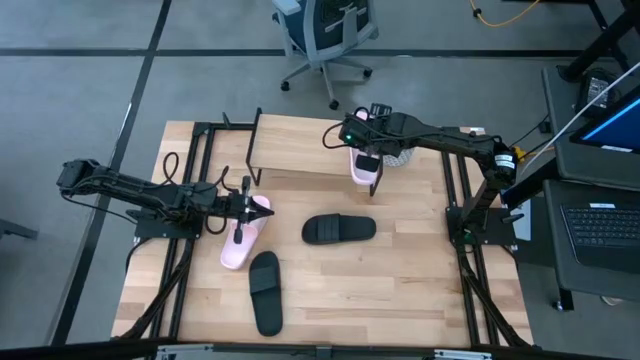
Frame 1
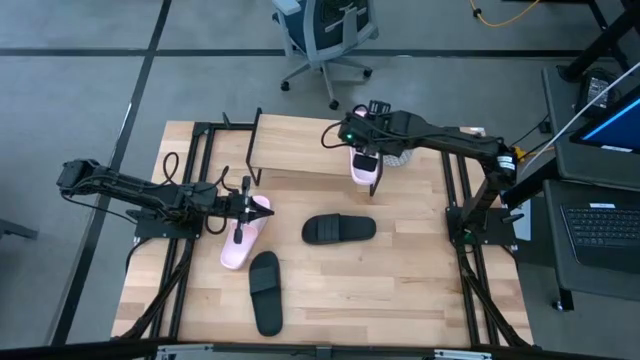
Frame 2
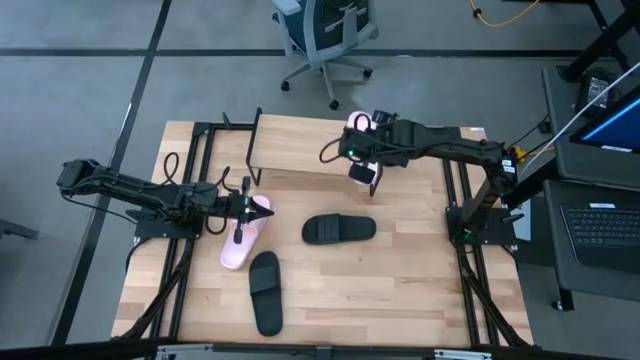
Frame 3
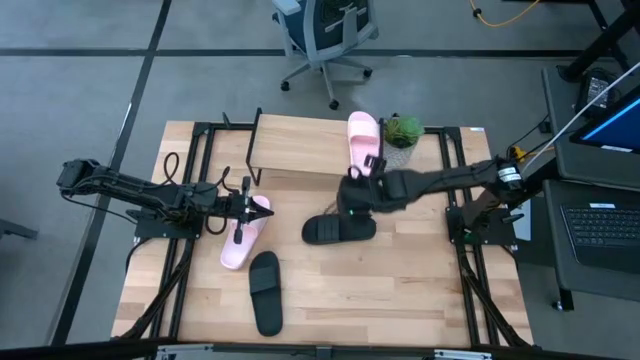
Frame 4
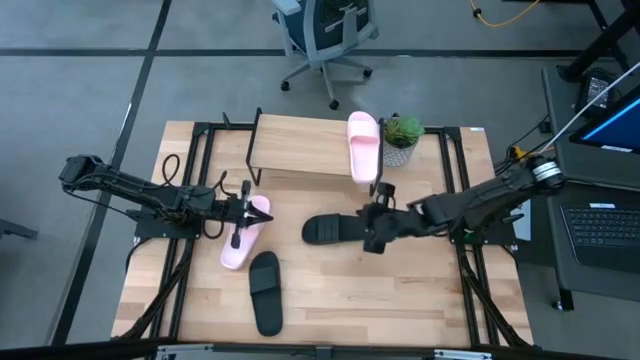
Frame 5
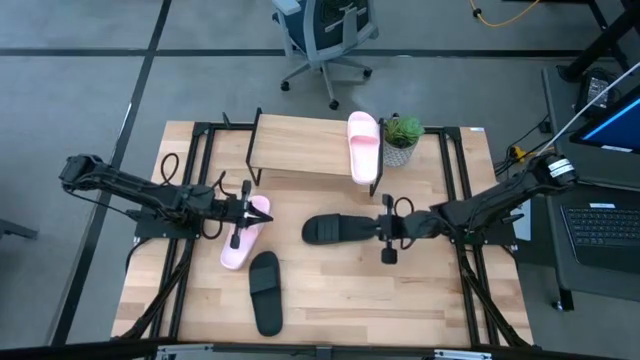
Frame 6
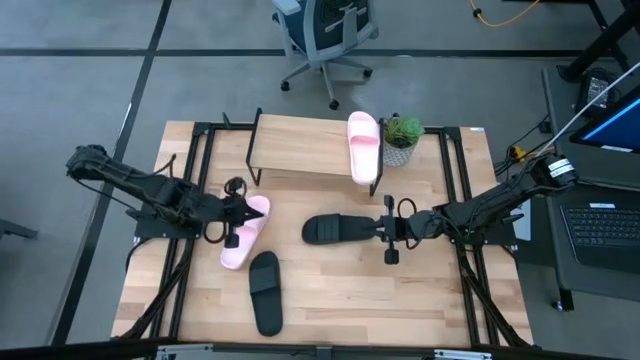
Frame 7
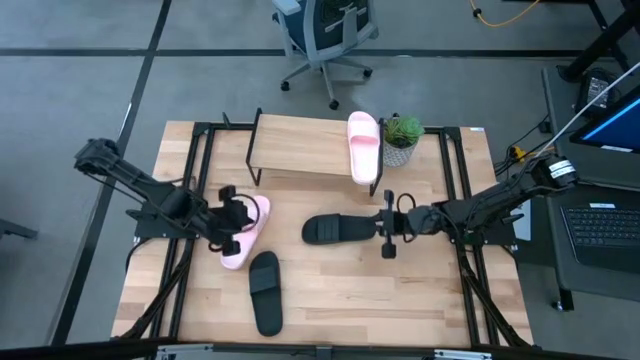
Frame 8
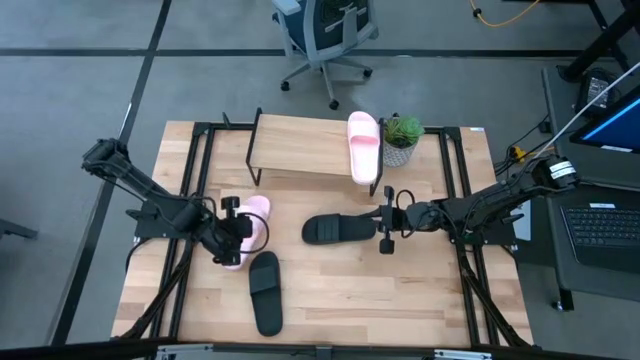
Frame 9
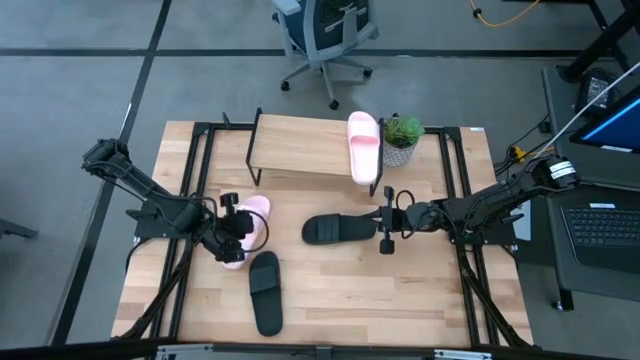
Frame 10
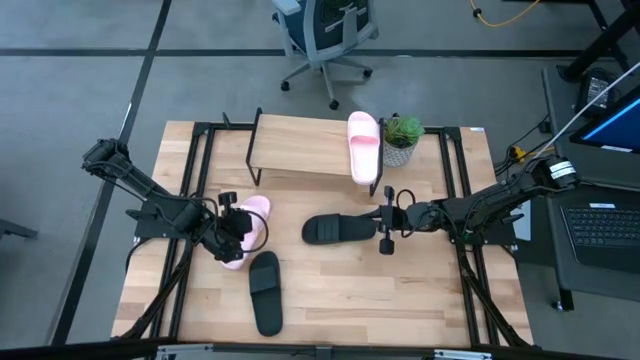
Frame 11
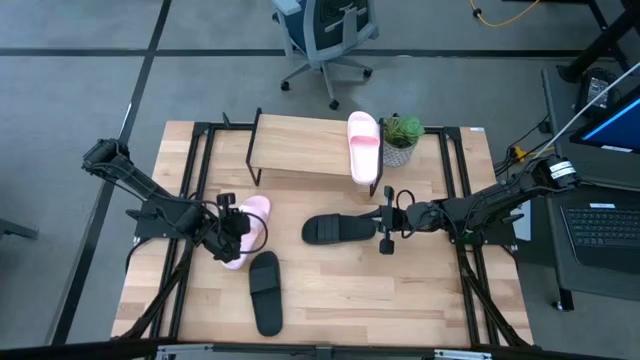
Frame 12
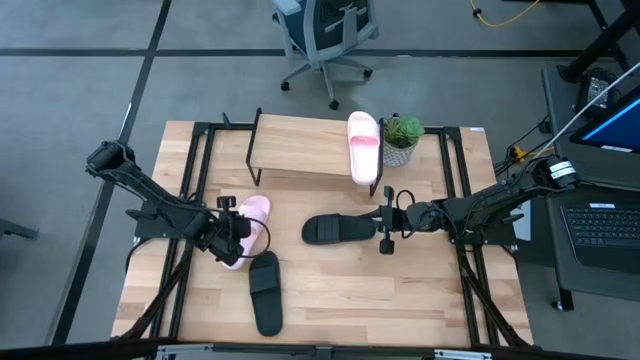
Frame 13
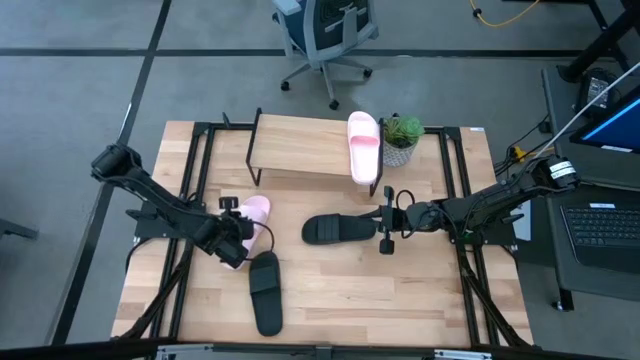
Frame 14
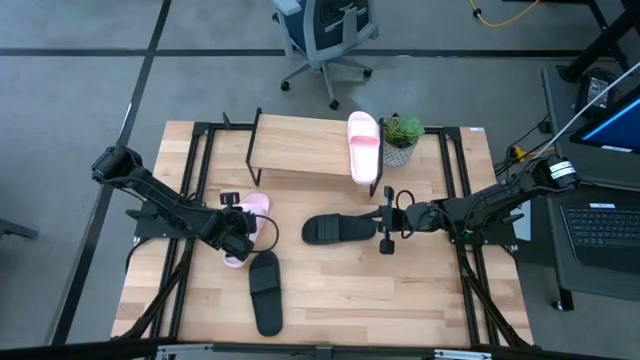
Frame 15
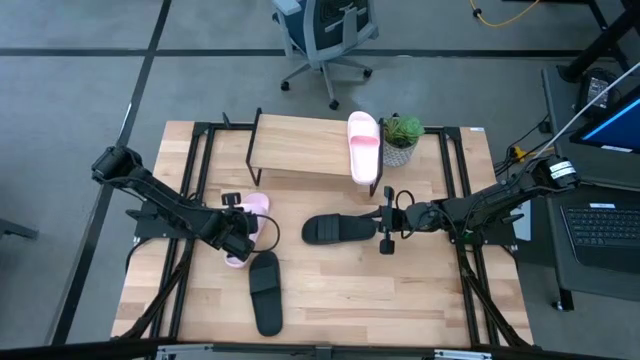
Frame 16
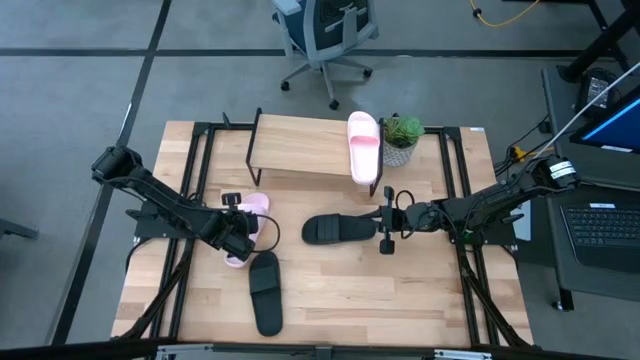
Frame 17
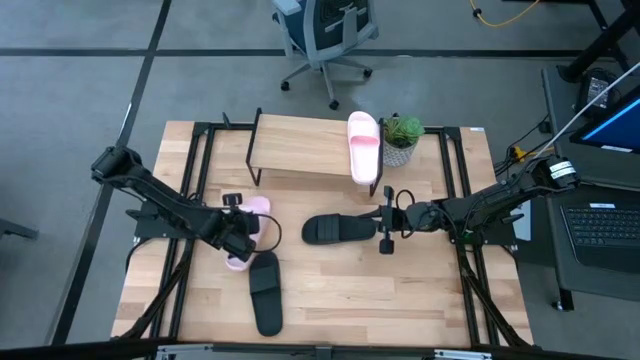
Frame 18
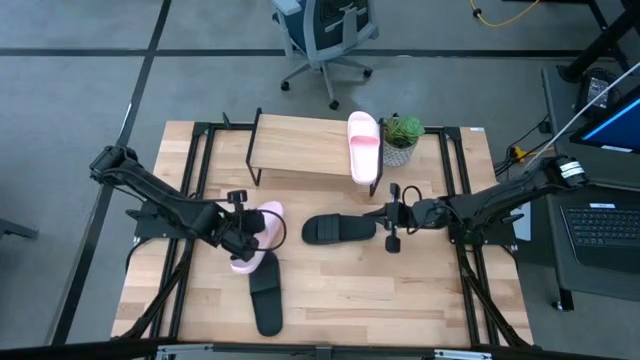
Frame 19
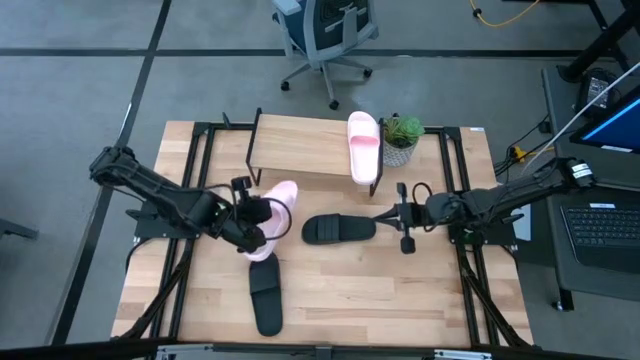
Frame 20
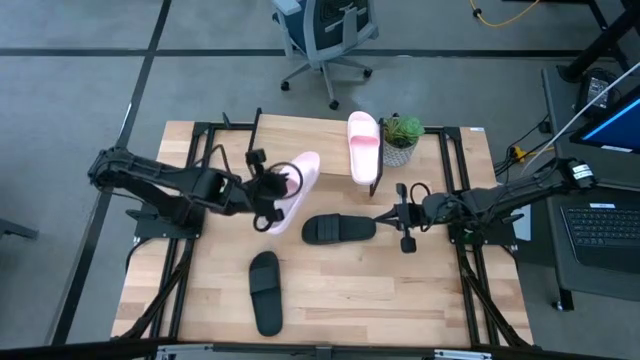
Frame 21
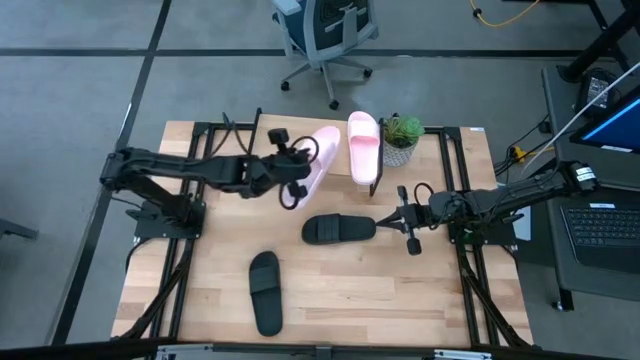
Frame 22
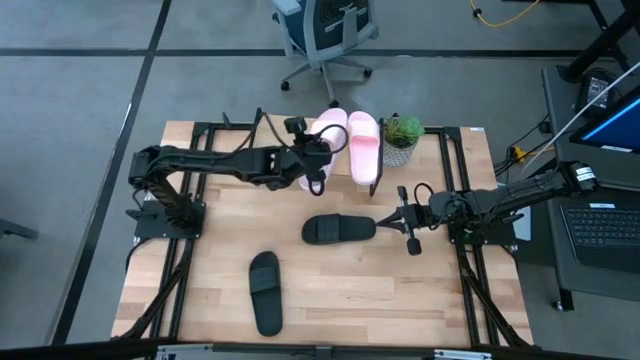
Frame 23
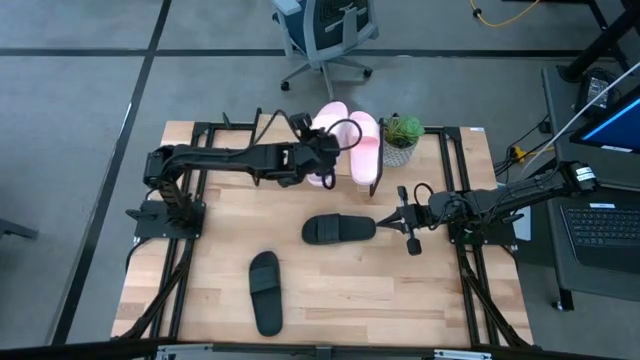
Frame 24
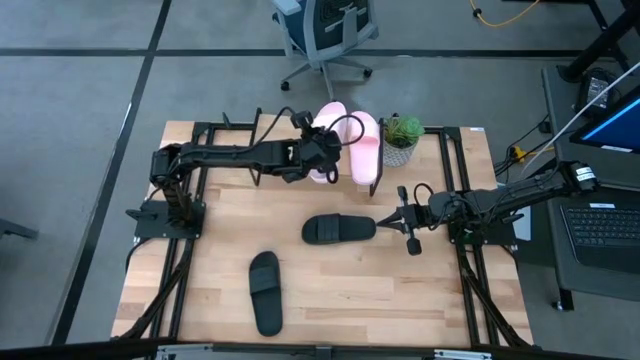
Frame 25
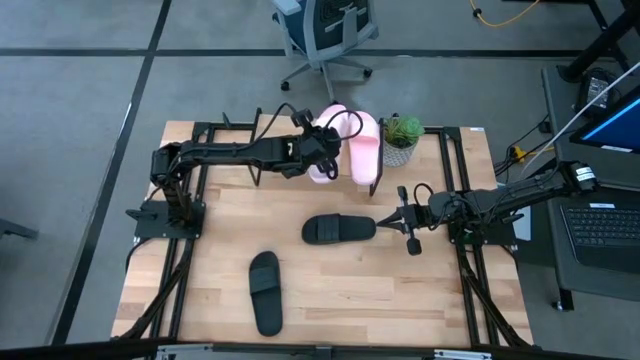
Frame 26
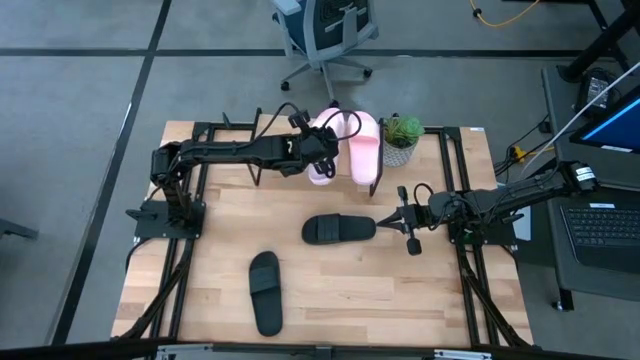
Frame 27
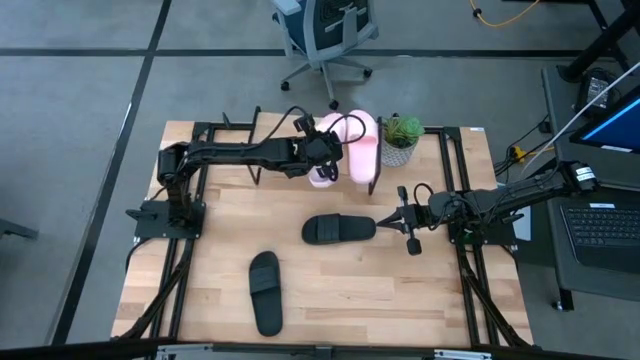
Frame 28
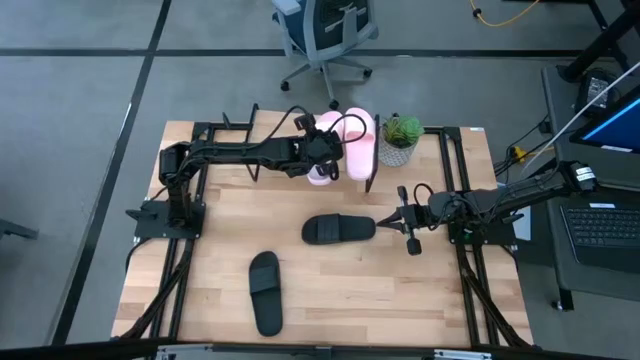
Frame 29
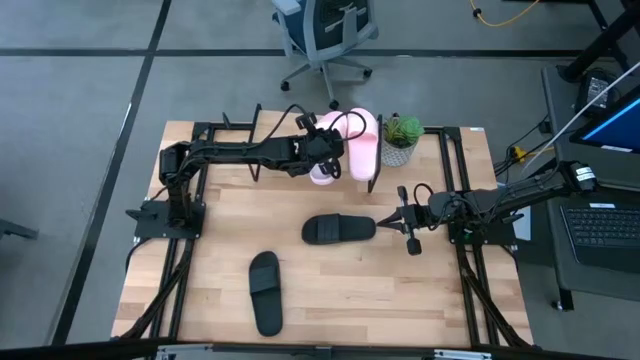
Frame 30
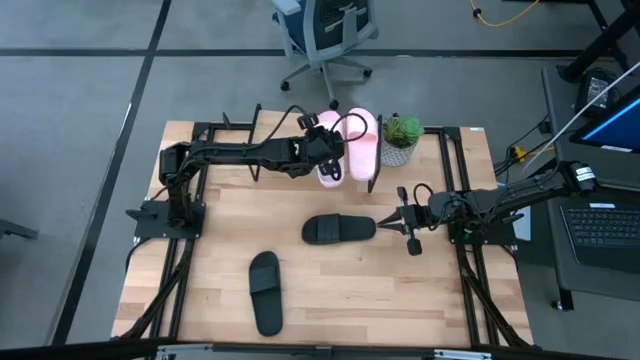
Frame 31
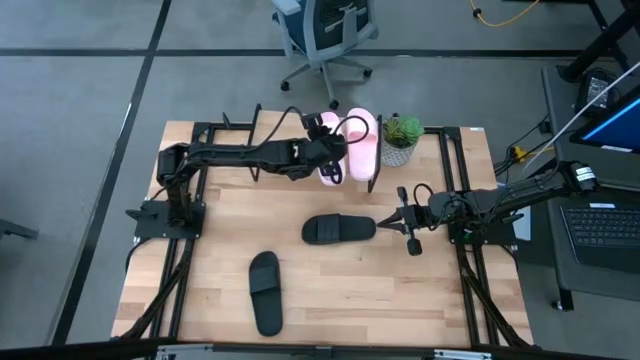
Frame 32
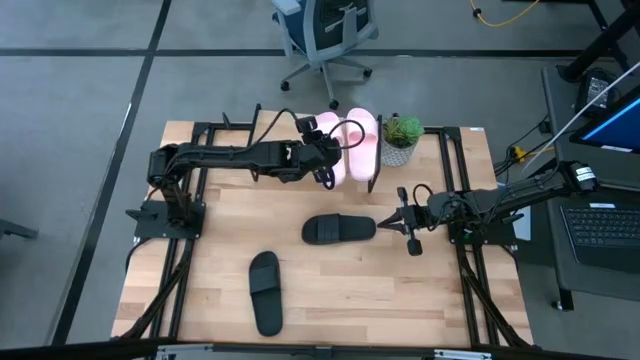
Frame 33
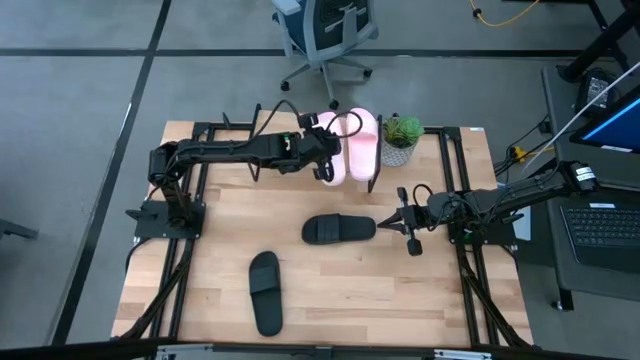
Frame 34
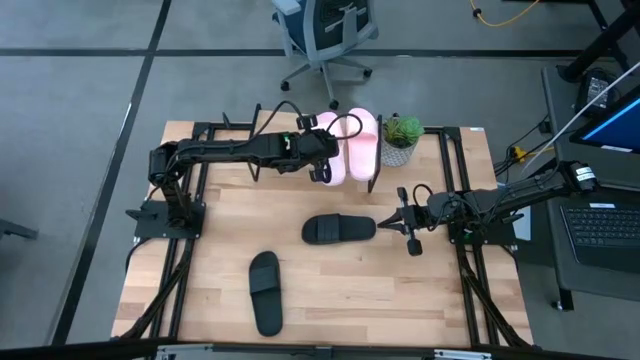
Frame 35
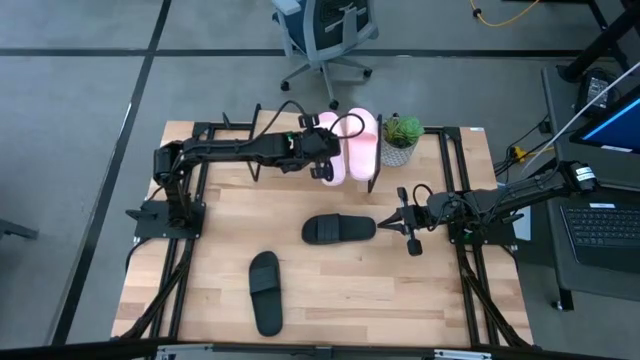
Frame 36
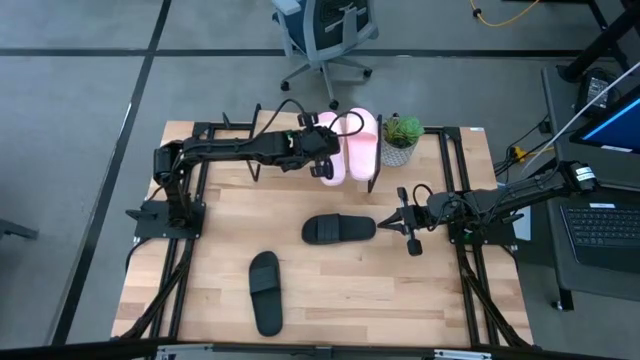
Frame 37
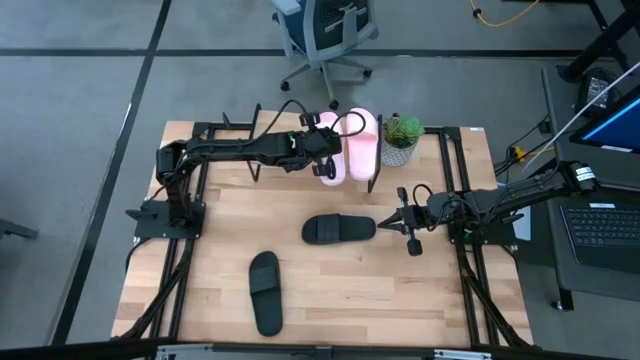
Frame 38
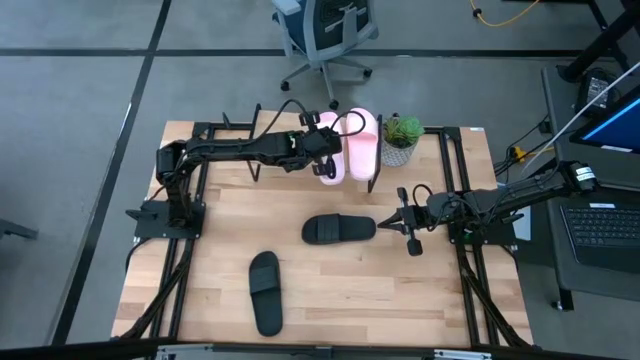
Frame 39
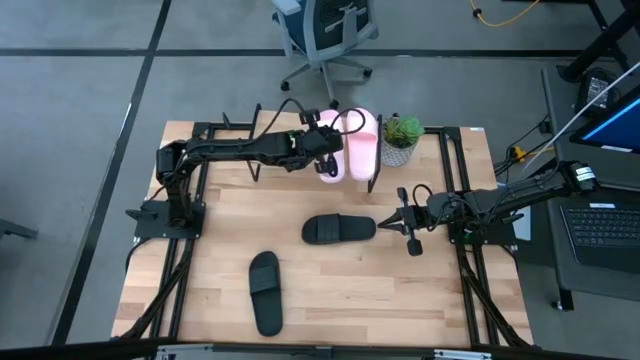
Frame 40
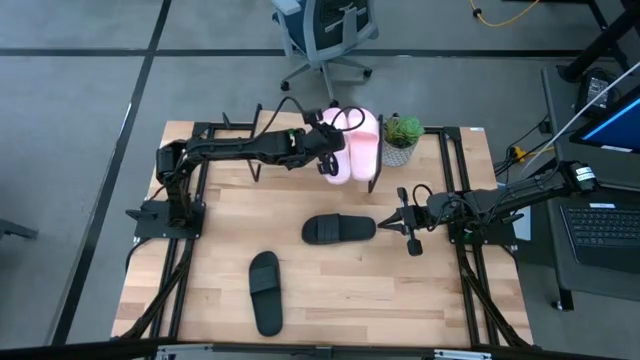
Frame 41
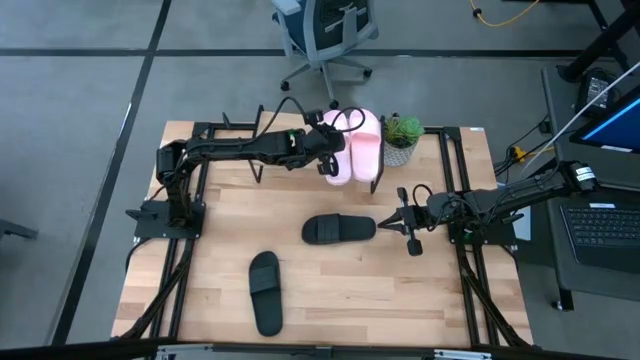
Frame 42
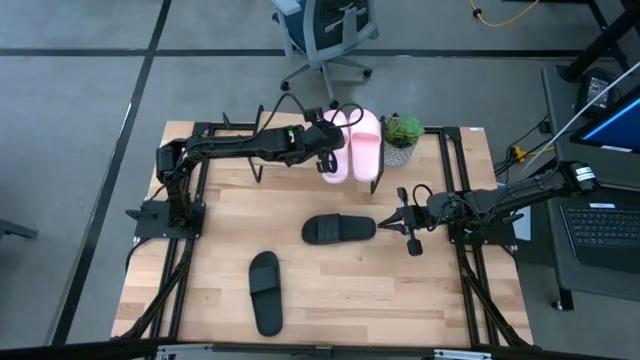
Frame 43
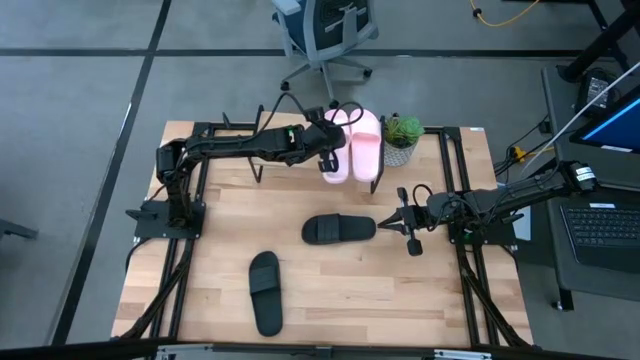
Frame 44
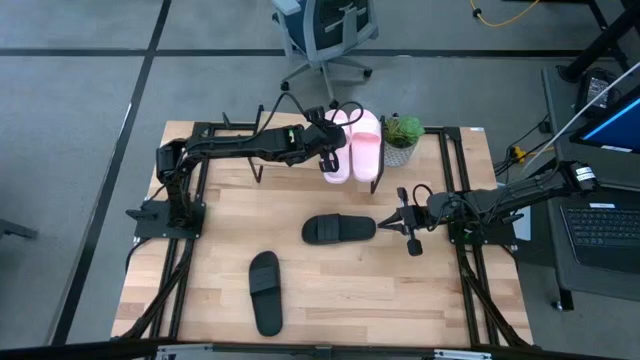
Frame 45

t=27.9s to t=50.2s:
Task: Pick and place slides into the shelf
Put the pink slides on the shelf
